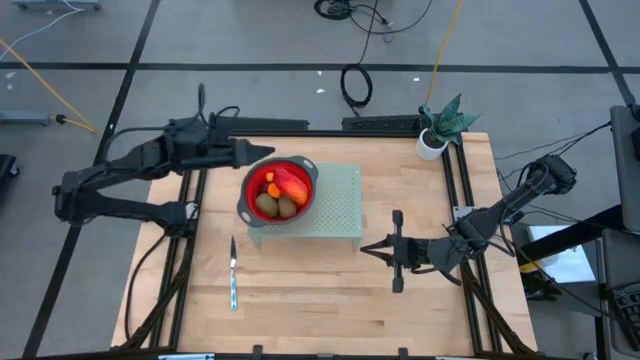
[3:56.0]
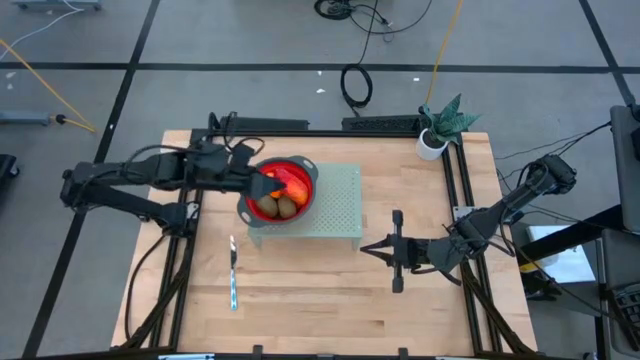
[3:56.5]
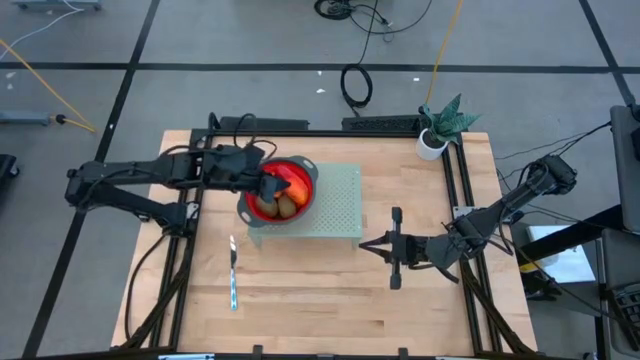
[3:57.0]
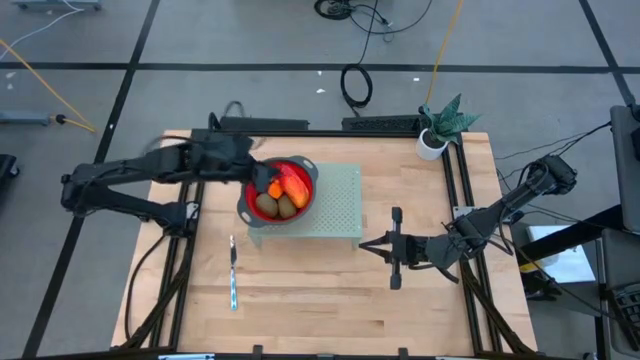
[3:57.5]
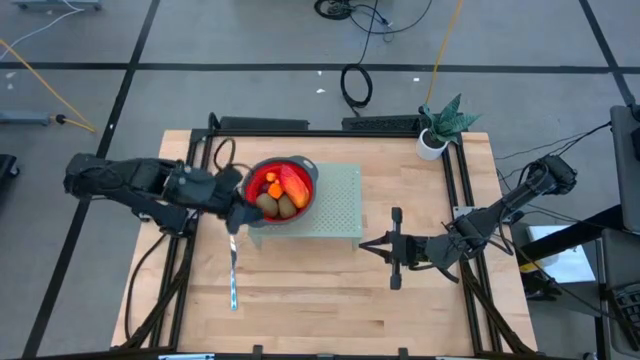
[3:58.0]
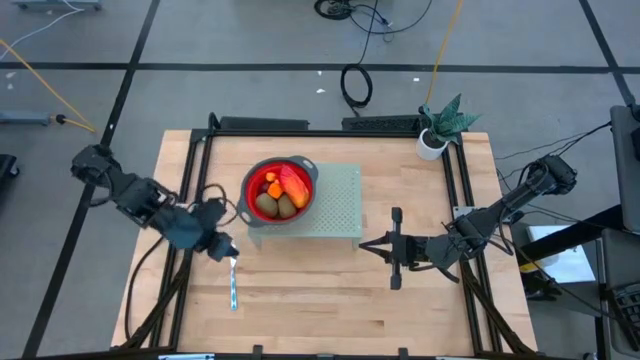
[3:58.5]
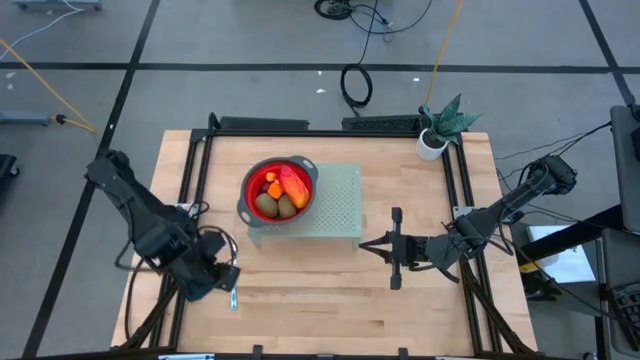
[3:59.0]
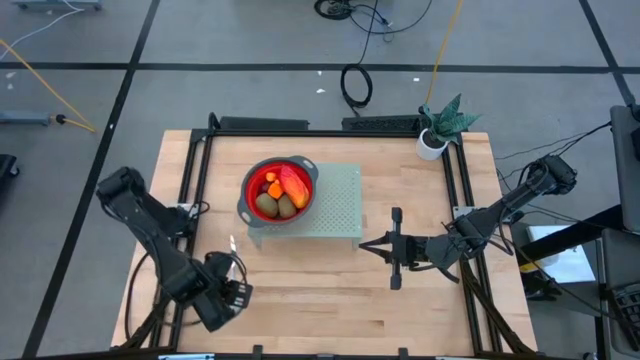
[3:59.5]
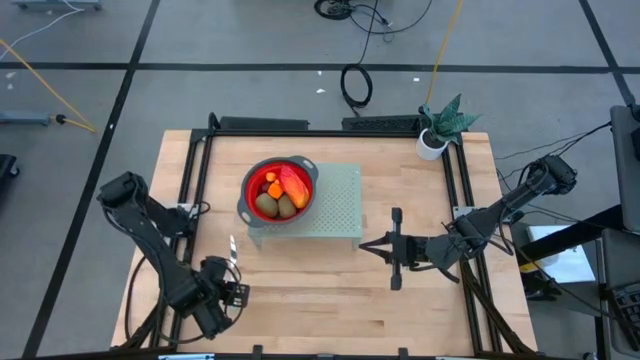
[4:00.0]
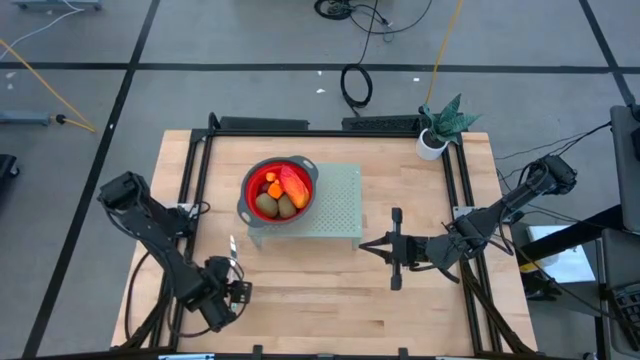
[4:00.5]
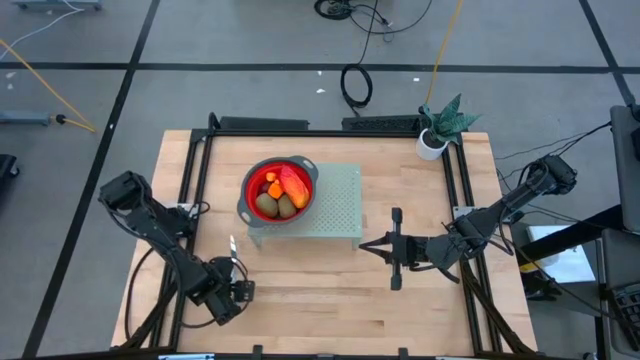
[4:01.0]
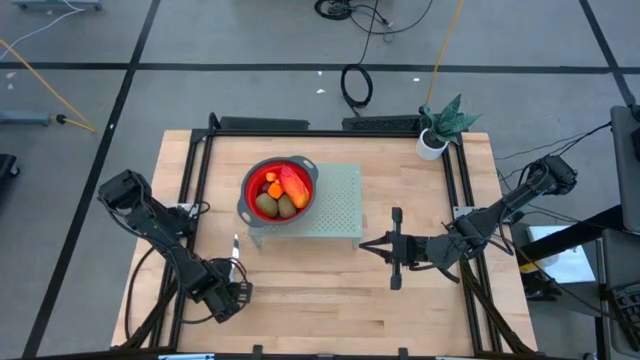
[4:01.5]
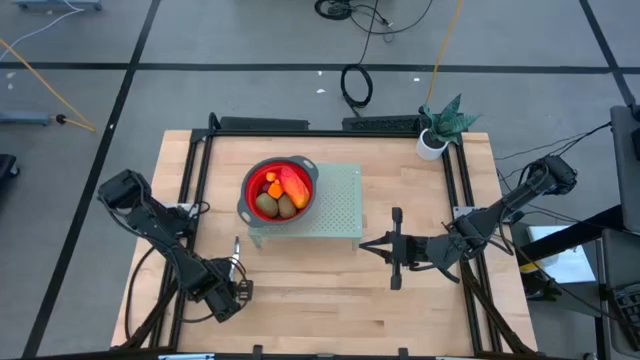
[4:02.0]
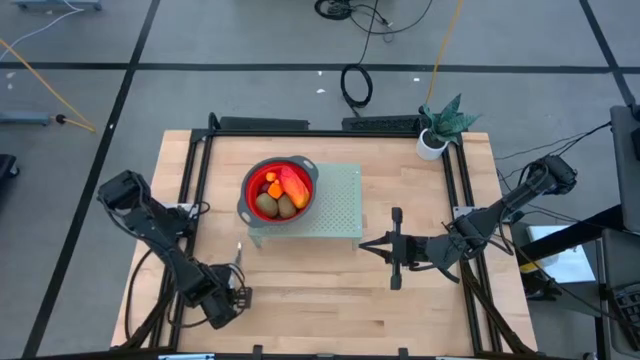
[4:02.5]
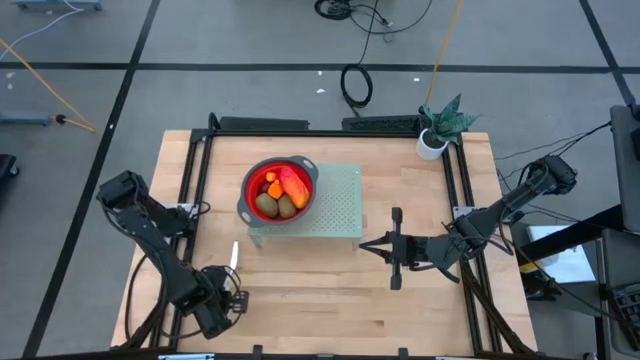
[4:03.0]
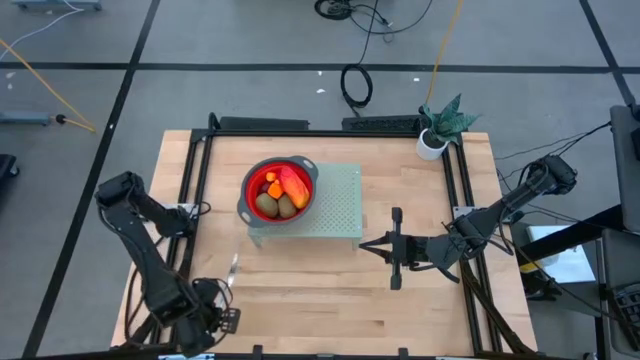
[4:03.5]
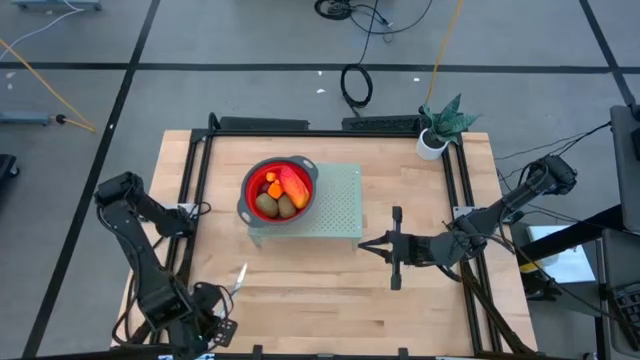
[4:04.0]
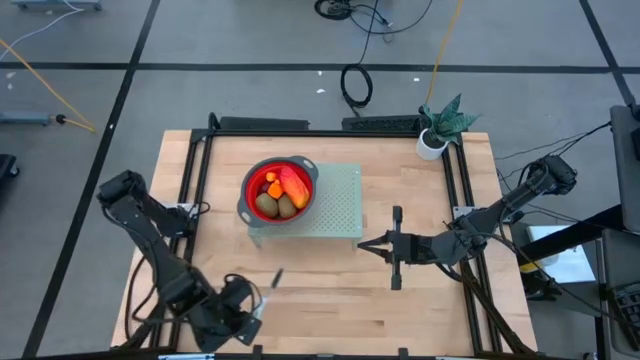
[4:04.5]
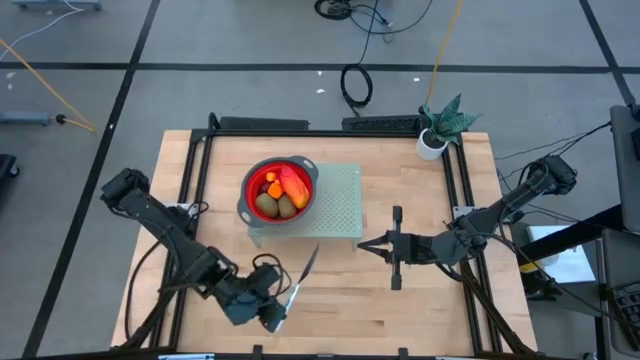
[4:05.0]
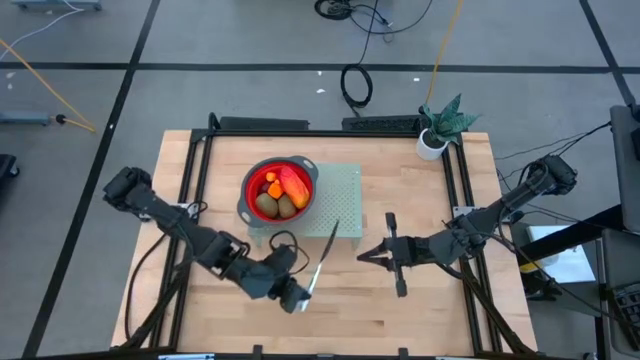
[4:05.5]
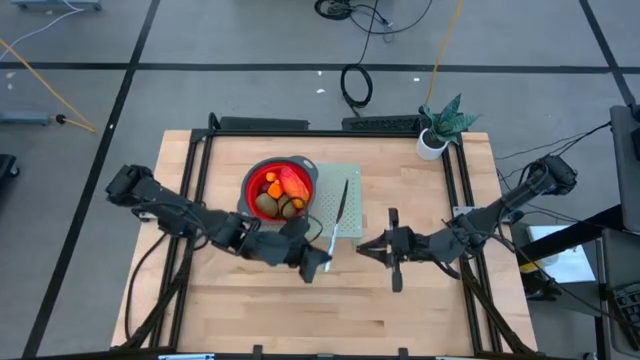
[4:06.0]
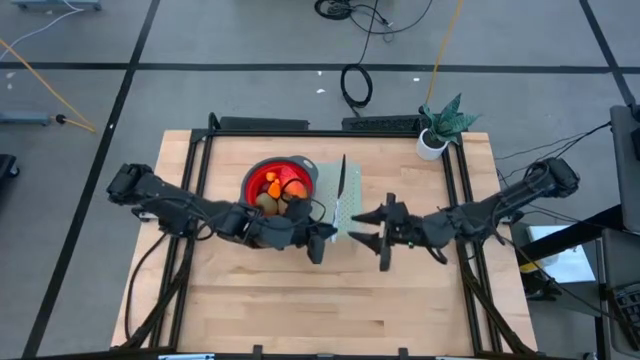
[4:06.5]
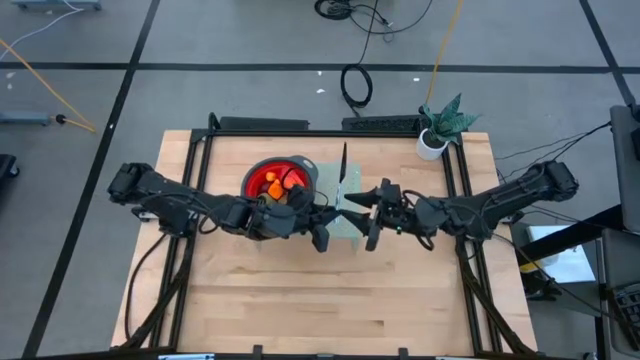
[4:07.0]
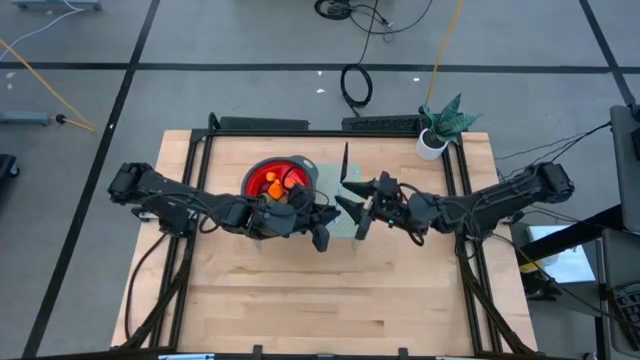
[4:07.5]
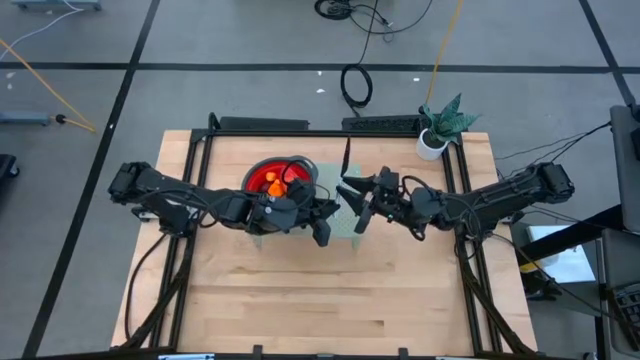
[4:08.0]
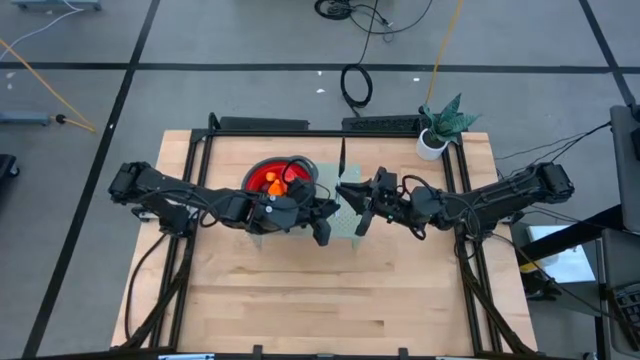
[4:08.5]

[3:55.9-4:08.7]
Task: Pick & Place Fruit
Put the knife onto the right side of the shelf

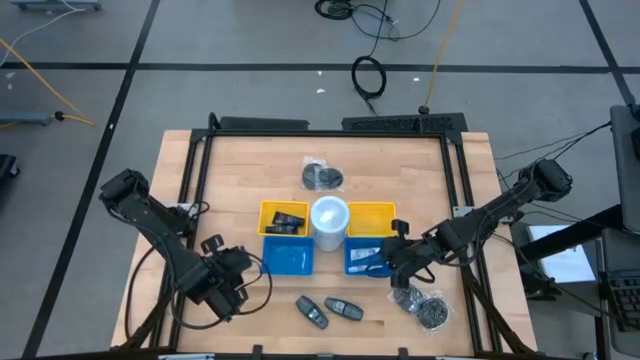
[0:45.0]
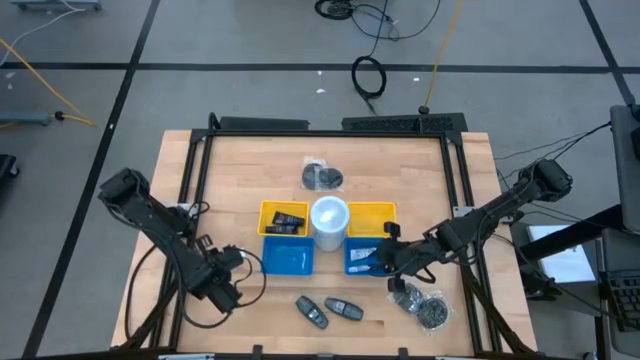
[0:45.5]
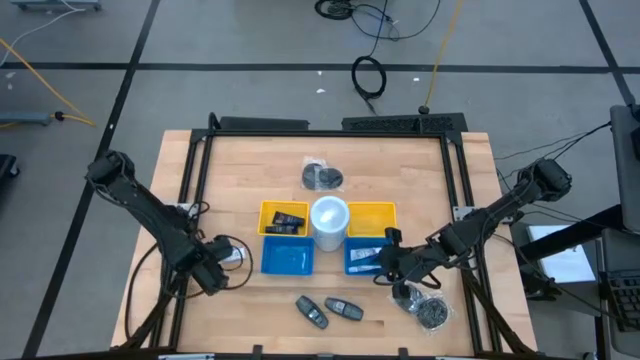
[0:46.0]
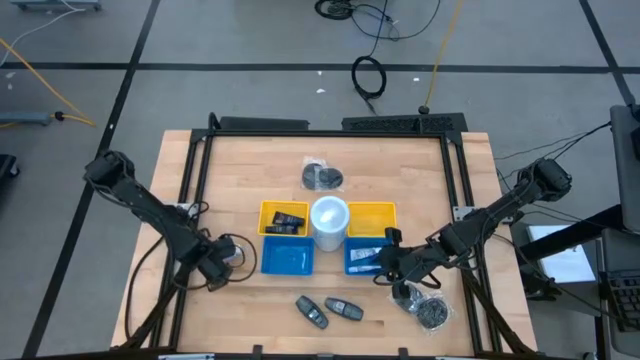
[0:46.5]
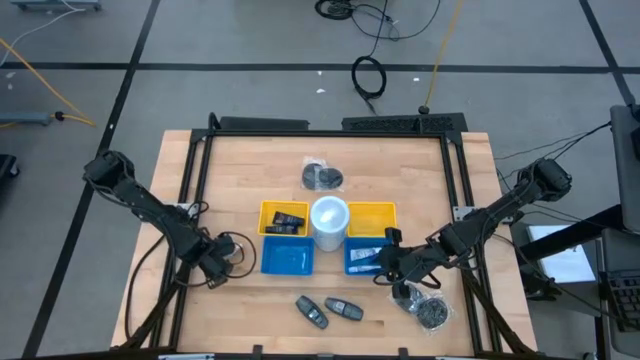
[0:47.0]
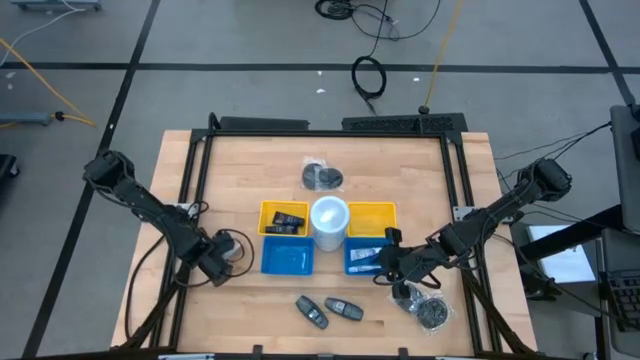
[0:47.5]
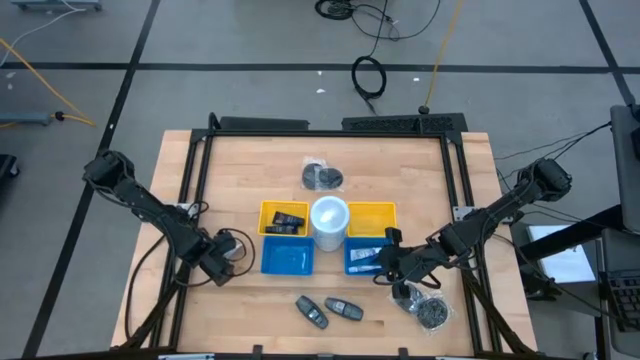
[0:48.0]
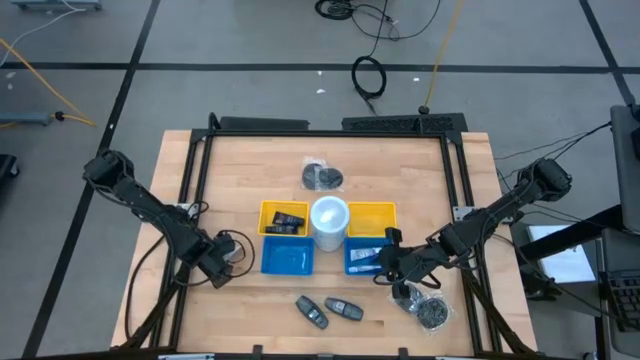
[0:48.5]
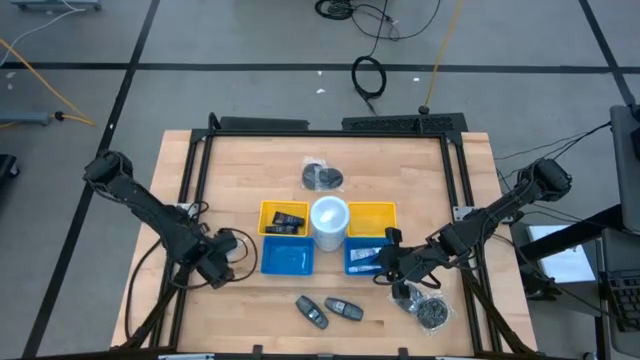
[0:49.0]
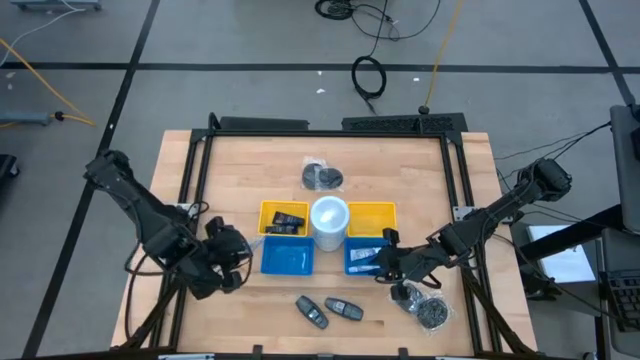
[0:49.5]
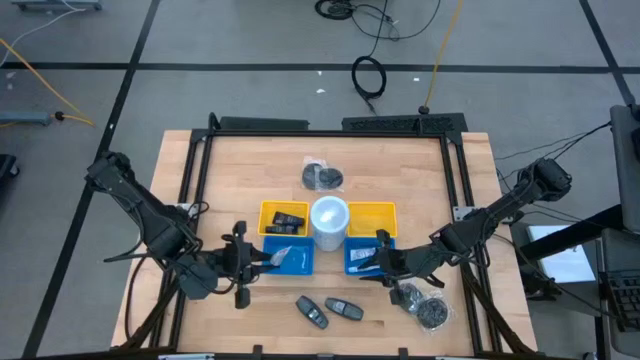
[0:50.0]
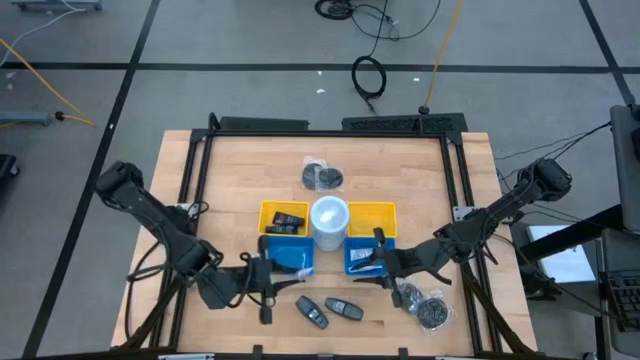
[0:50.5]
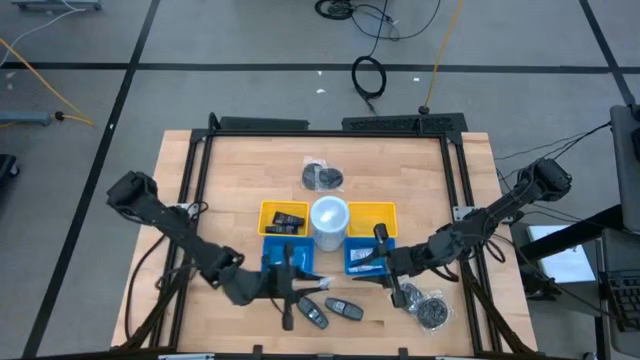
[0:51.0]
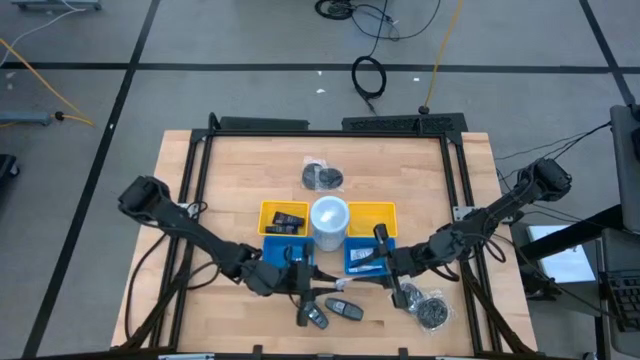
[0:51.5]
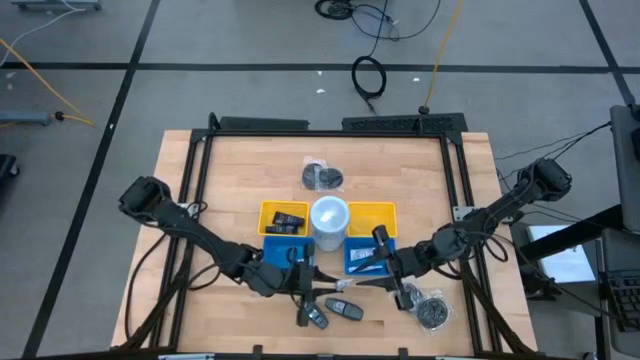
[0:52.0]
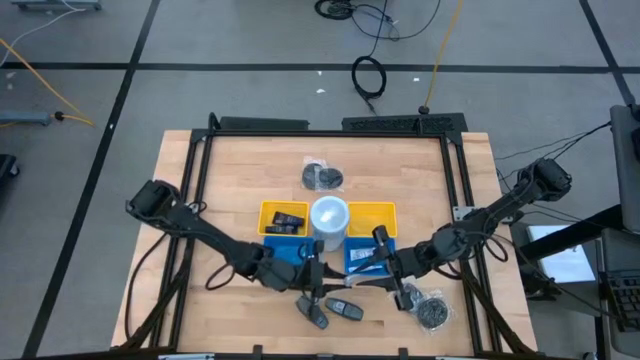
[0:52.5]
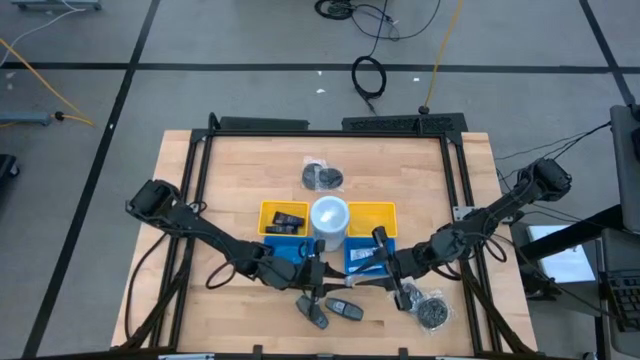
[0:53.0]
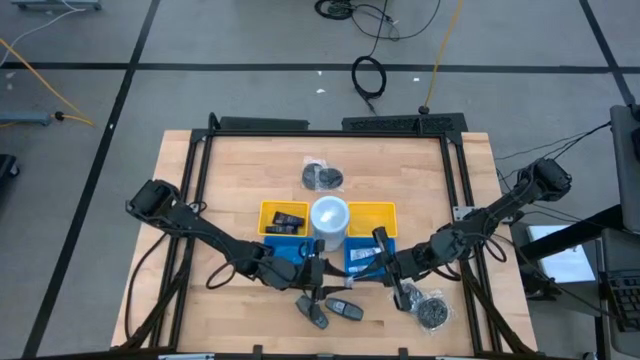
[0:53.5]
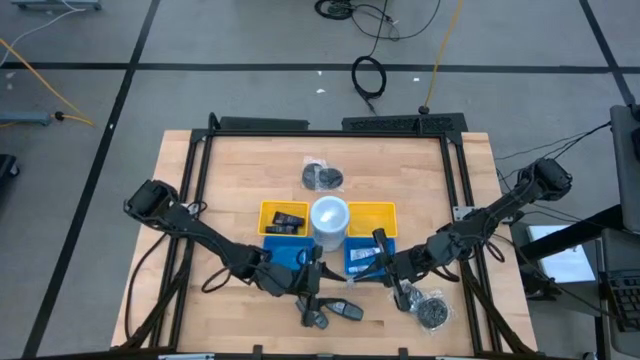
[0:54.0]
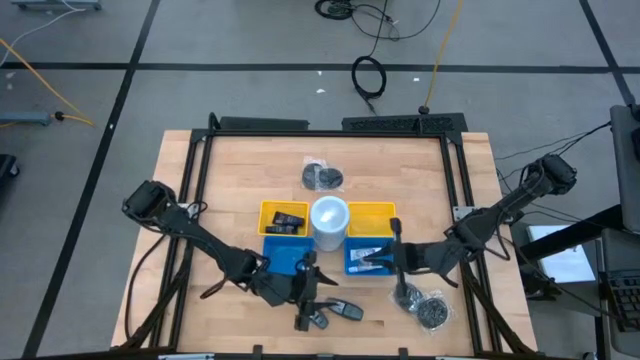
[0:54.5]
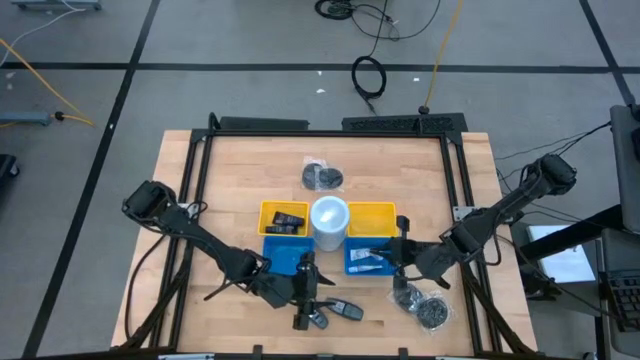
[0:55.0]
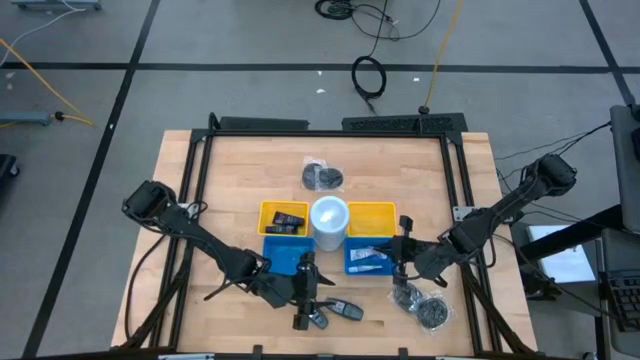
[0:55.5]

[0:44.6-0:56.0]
Task: Pick & Place Travel size toiletries
Put the toothpaste into the right blue bin
